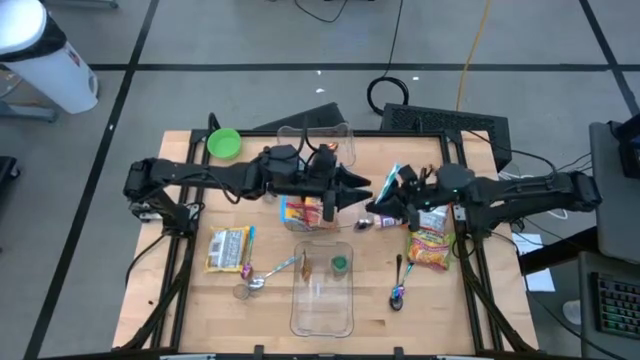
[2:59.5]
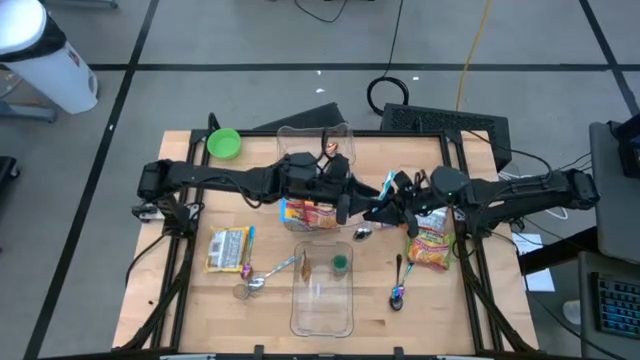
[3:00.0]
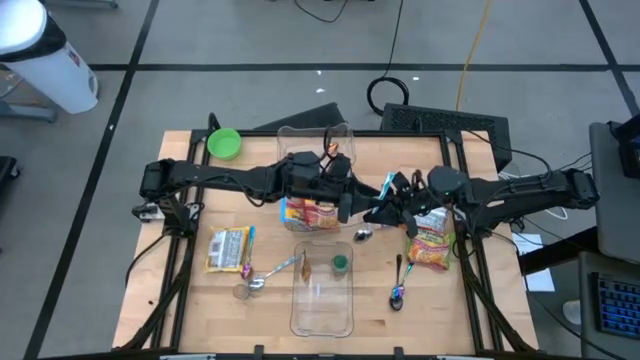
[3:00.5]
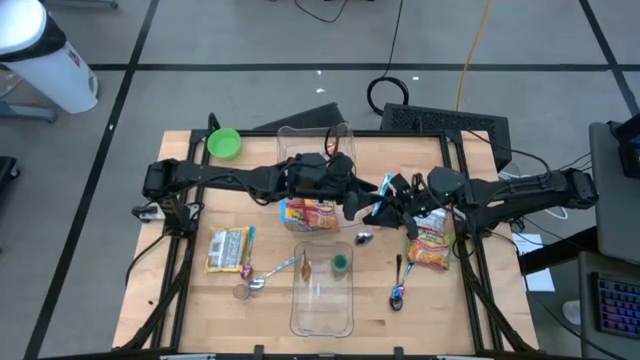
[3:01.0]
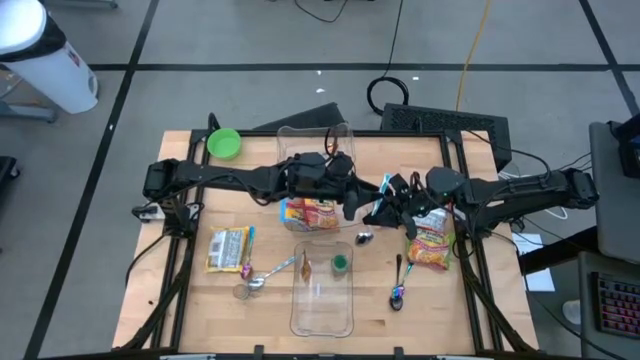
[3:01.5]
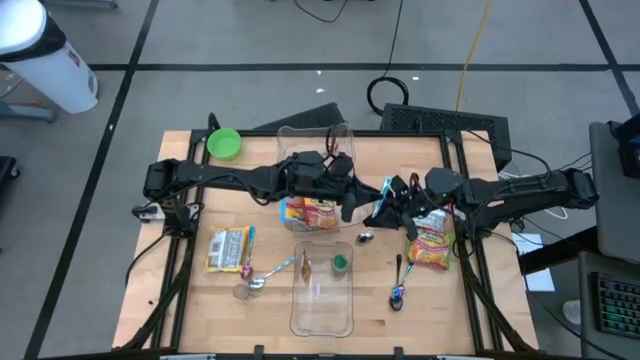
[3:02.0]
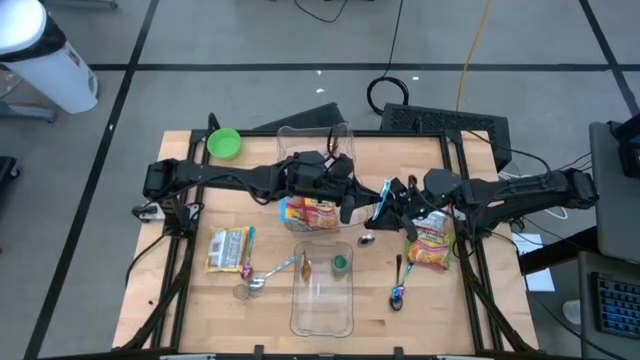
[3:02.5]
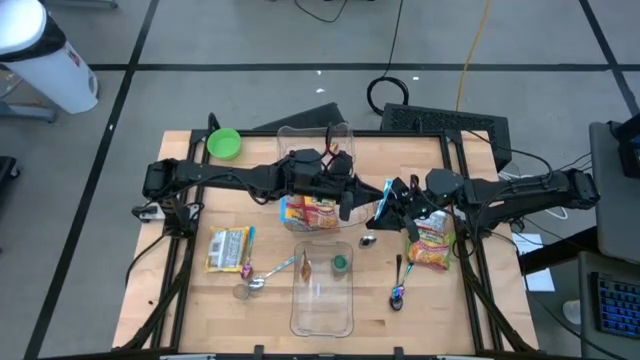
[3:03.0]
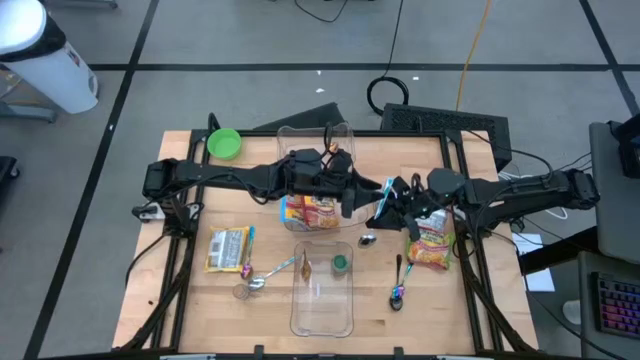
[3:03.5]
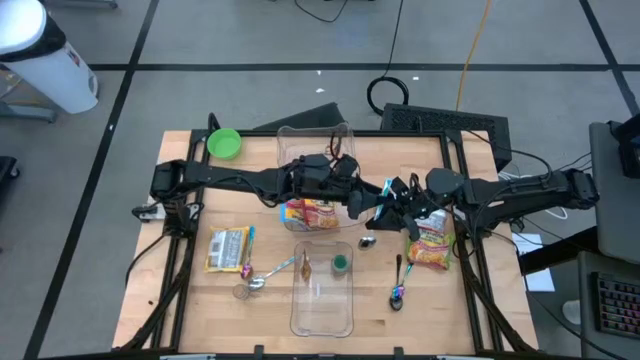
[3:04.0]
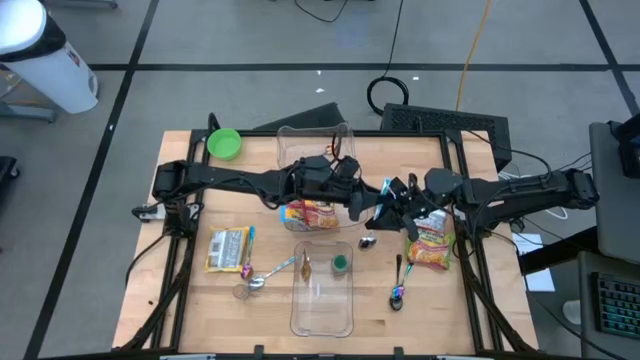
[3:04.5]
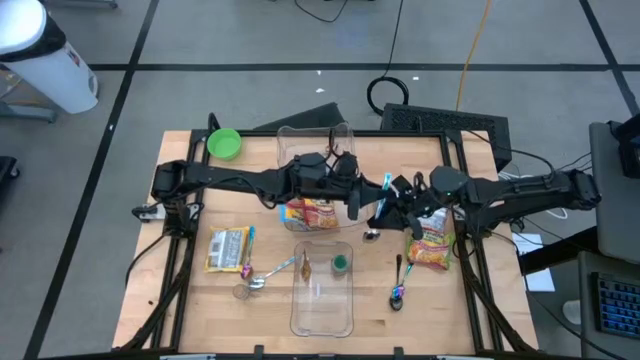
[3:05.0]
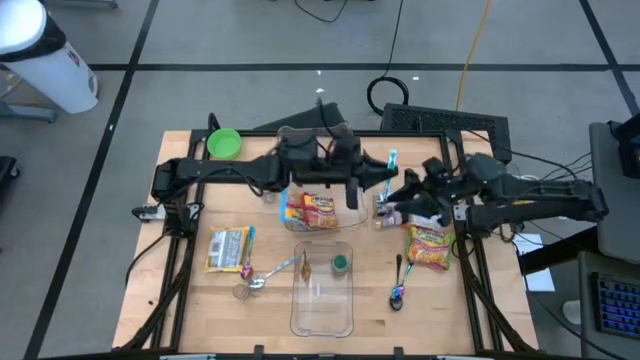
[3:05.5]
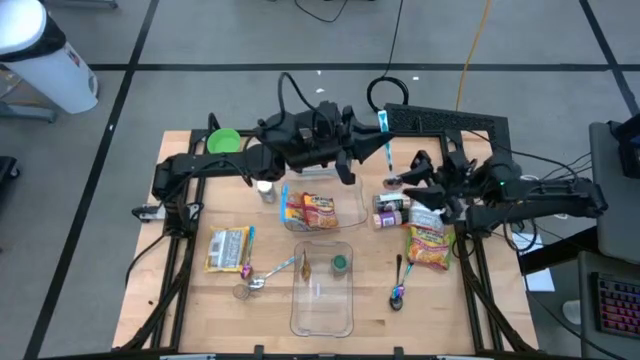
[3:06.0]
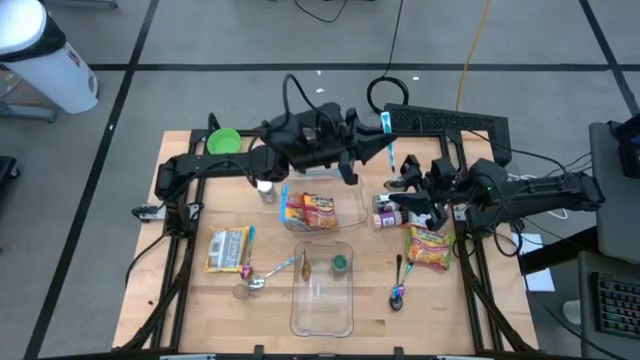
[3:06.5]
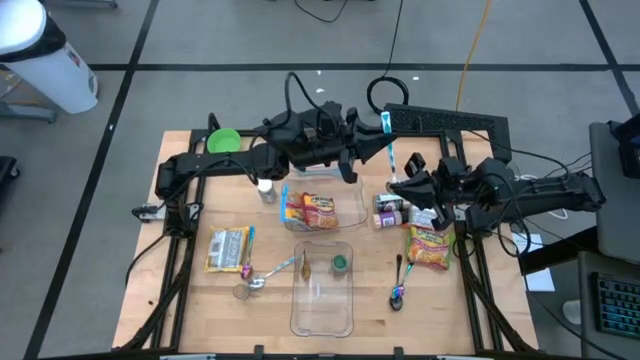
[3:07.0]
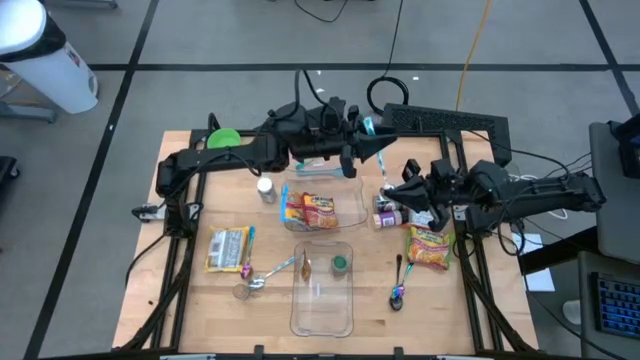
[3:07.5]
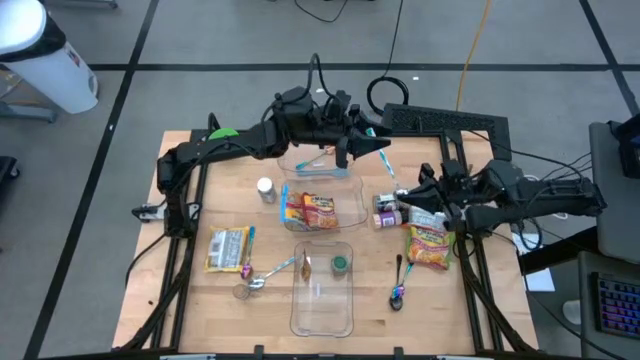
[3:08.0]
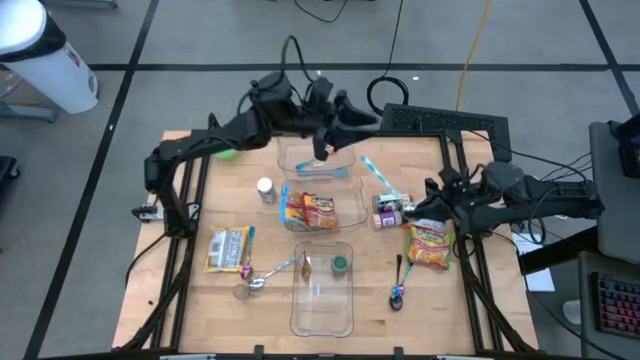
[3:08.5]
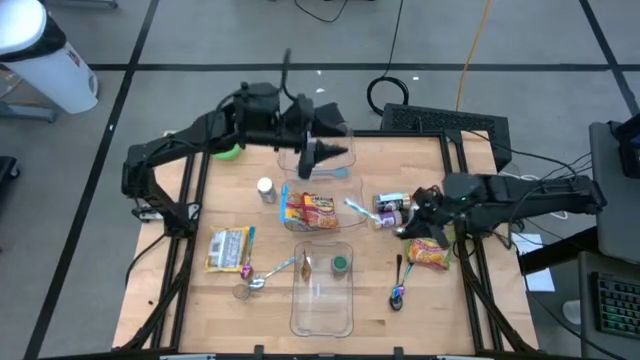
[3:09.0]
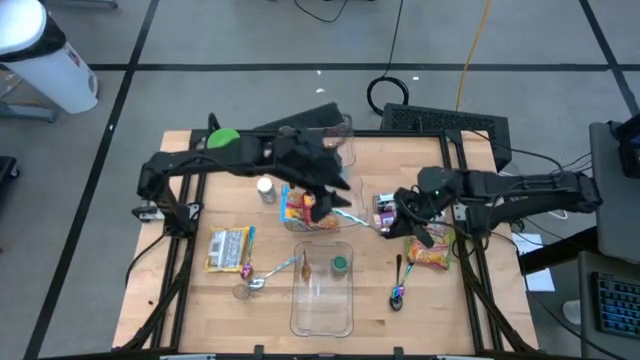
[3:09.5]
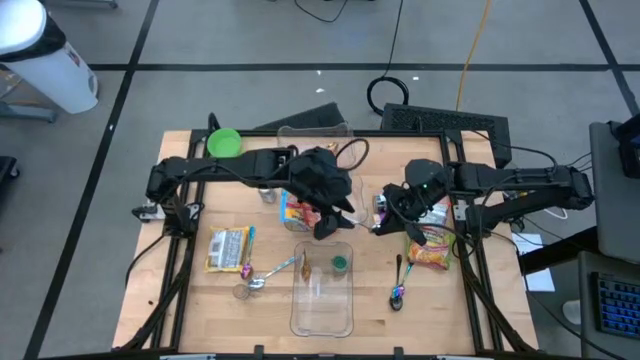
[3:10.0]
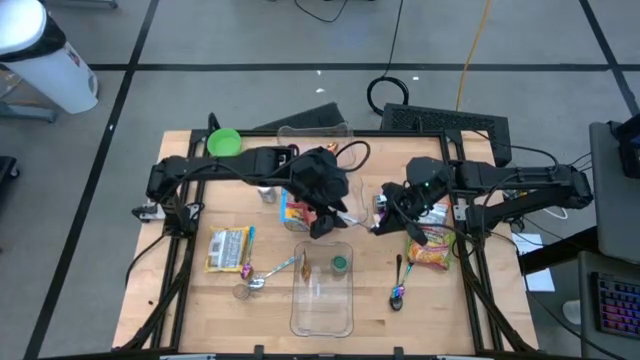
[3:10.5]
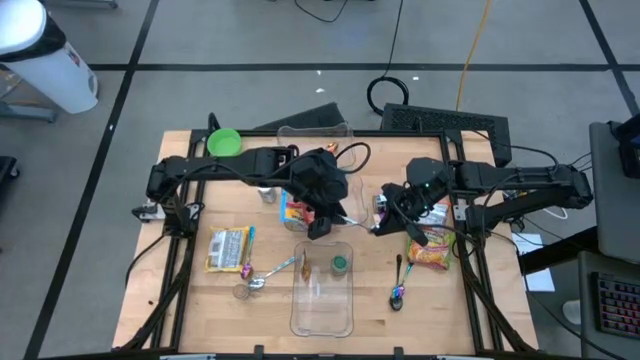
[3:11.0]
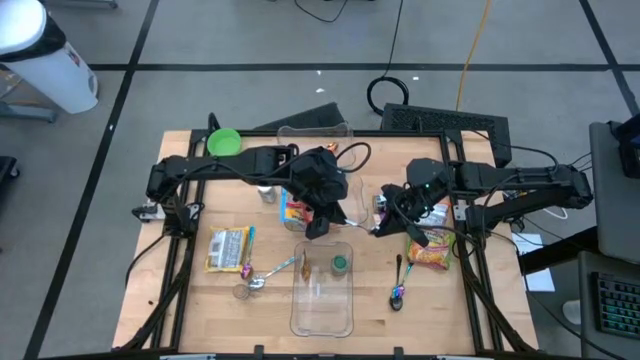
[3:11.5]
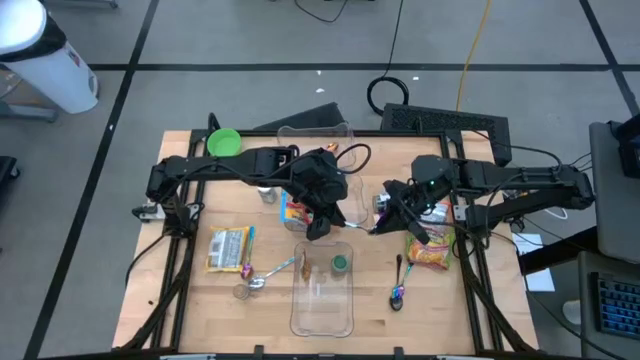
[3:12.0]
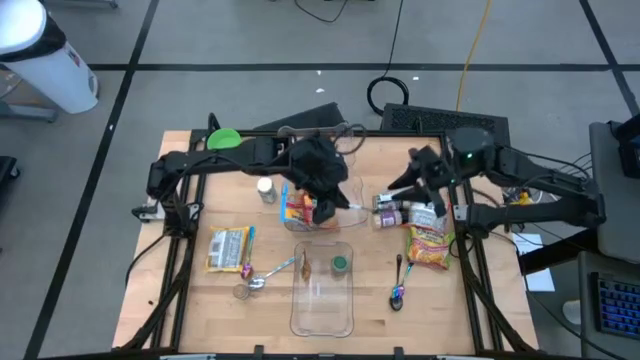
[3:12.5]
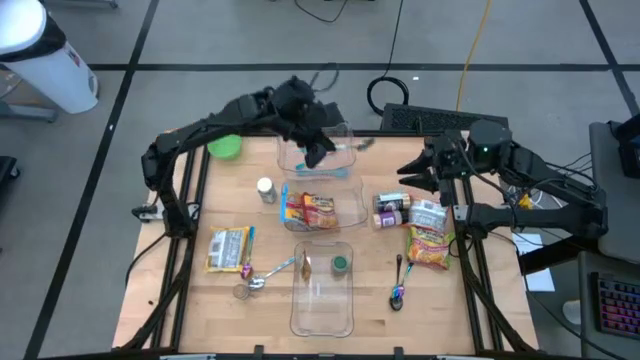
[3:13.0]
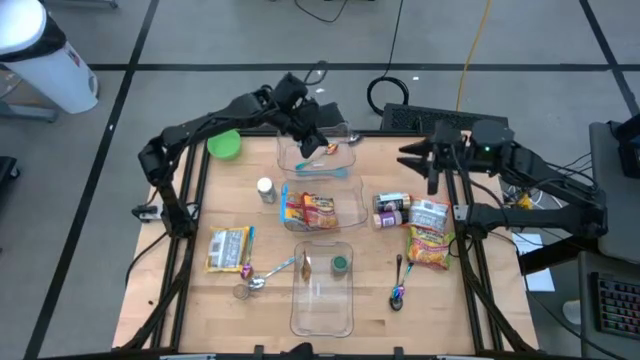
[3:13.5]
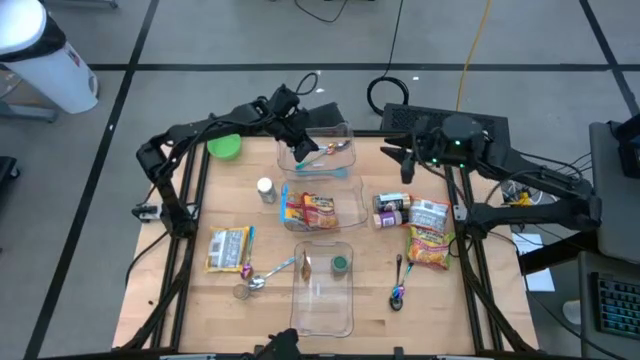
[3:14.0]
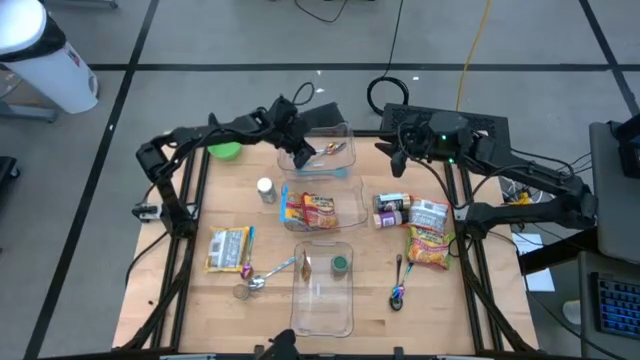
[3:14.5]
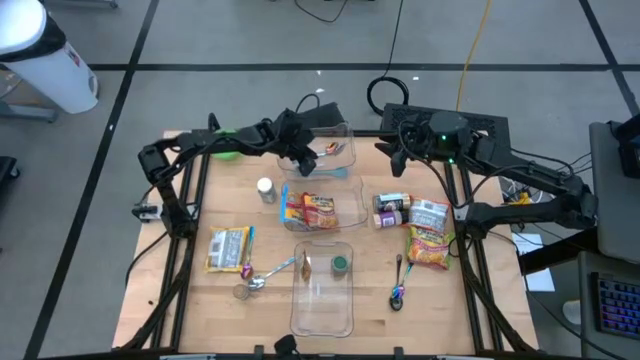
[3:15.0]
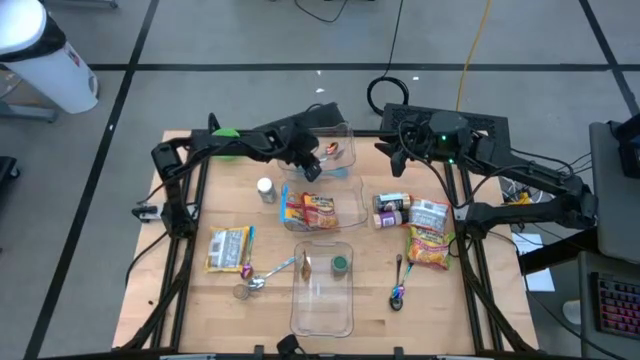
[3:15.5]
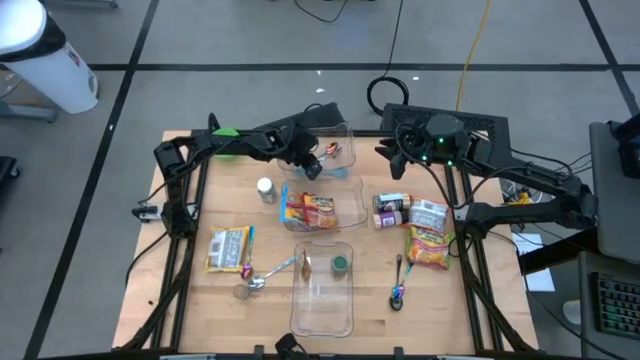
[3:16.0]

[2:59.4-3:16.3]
Task: Pick & Place Food Item
Put the left blue patterned spoon into the top transparent bin

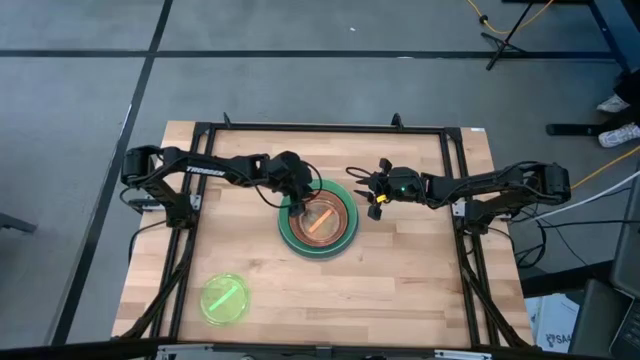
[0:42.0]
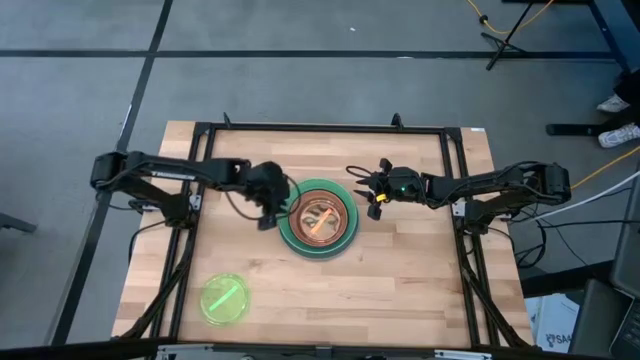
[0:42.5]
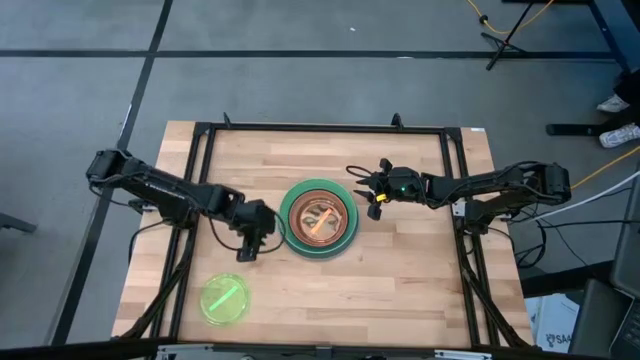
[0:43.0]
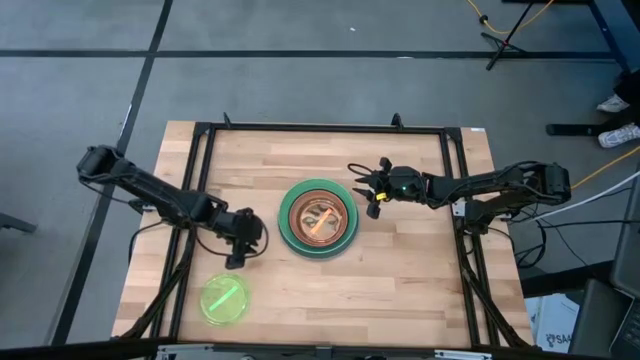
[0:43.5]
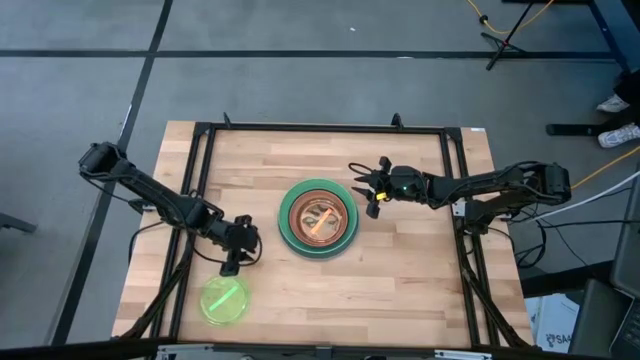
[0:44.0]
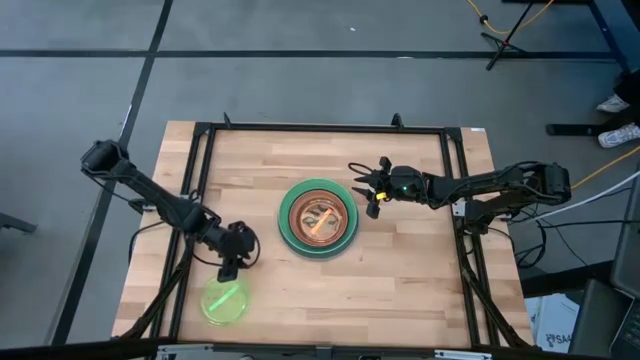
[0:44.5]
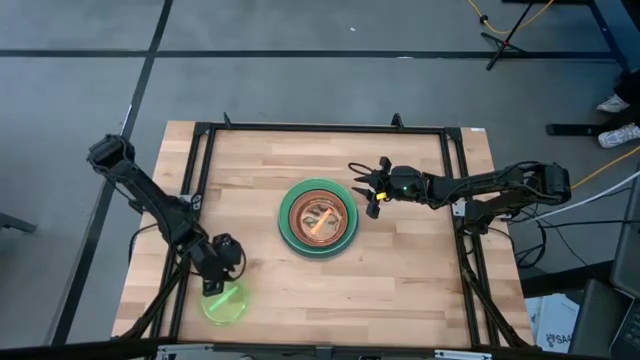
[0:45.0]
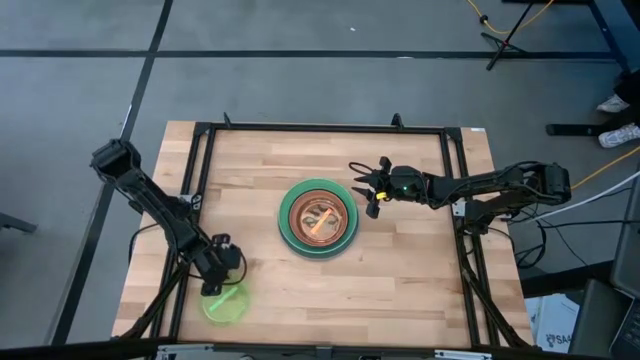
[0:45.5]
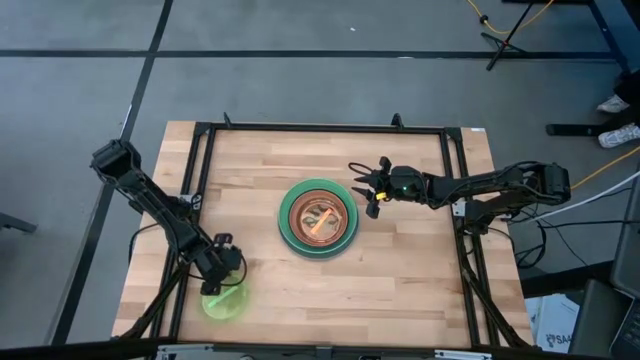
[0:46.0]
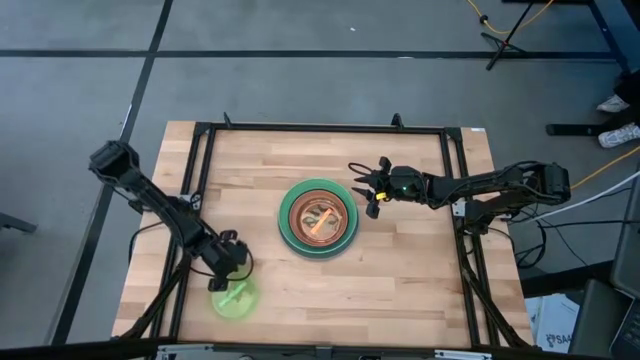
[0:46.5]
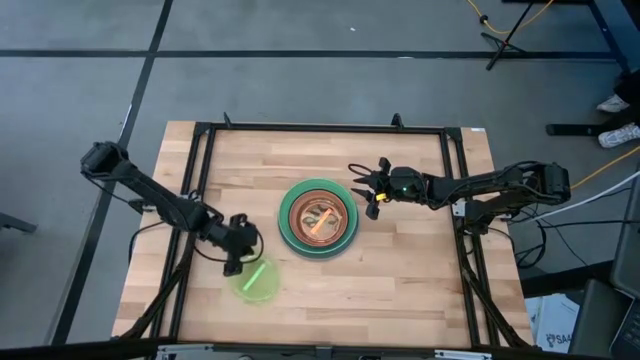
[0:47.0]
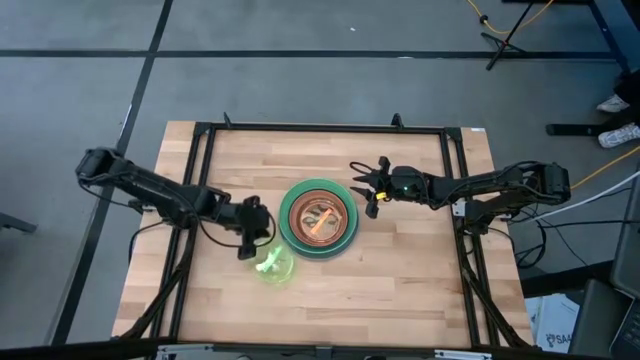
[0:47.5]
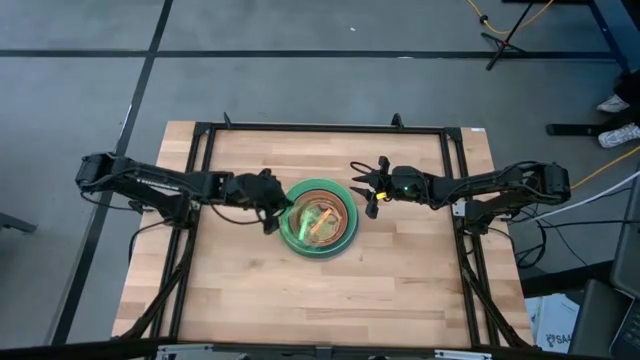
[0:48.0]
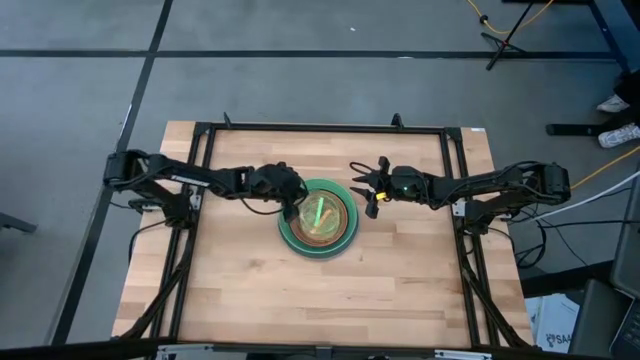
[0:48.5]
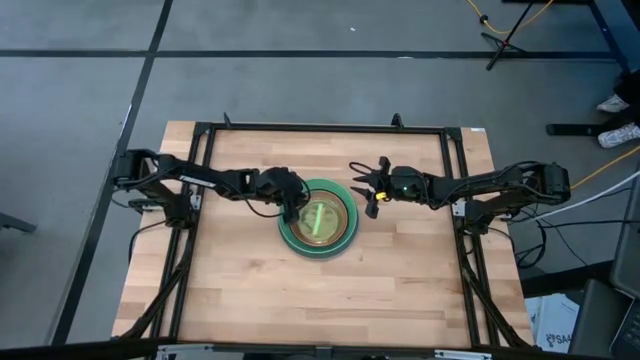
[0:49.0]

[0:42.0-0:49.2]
Task: Stack plastic plates
Stack the light green plate on top of the orange plate
